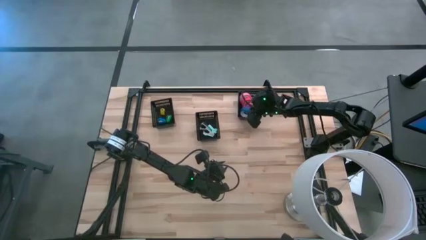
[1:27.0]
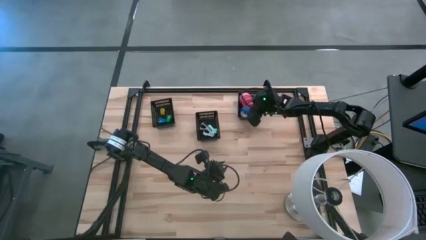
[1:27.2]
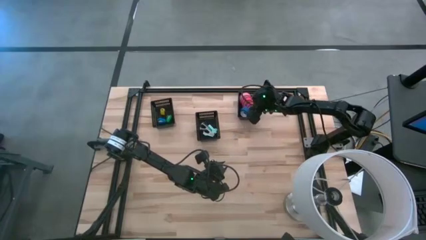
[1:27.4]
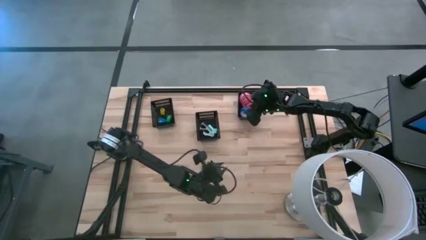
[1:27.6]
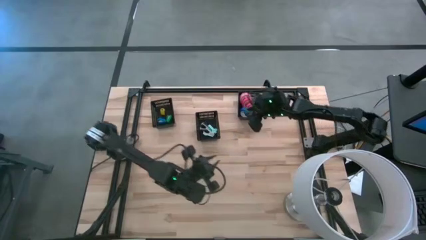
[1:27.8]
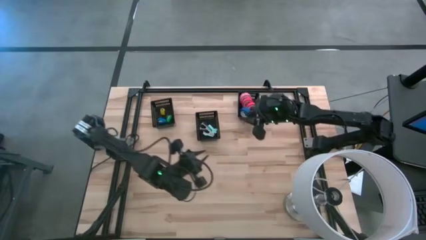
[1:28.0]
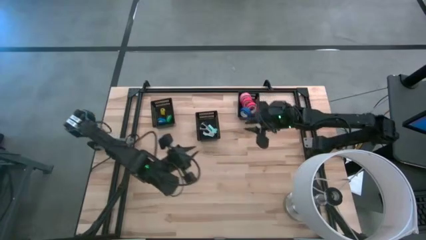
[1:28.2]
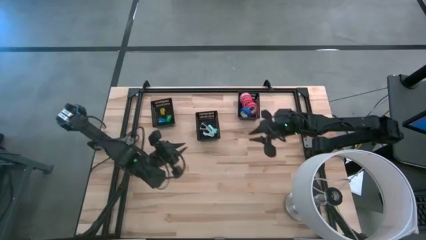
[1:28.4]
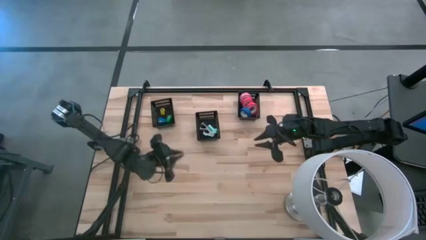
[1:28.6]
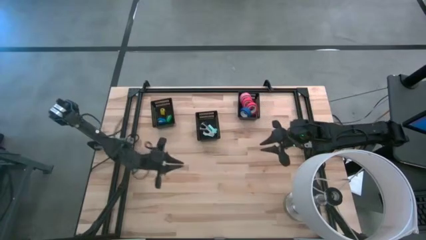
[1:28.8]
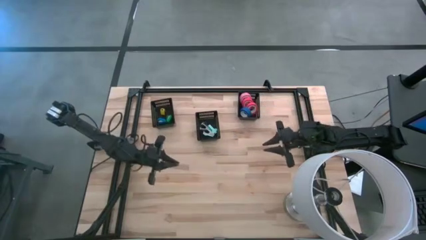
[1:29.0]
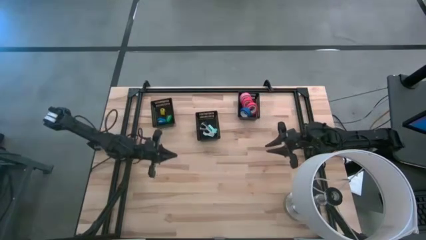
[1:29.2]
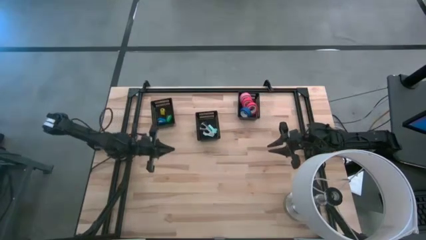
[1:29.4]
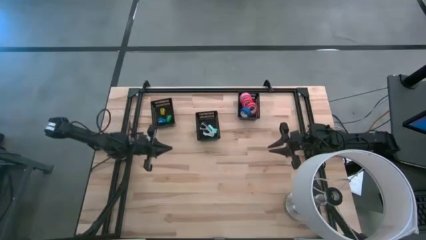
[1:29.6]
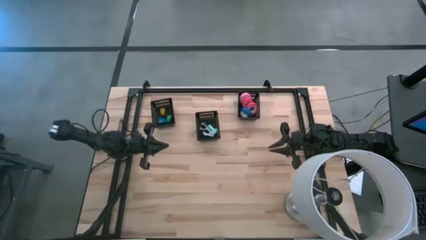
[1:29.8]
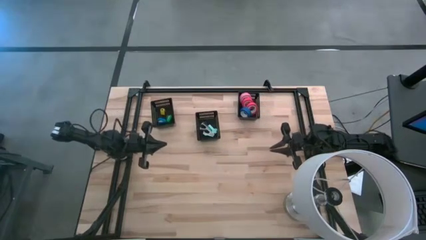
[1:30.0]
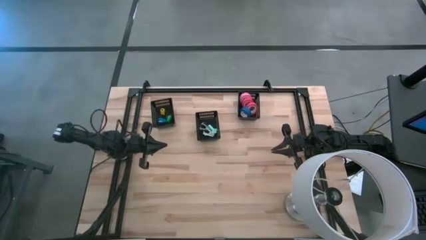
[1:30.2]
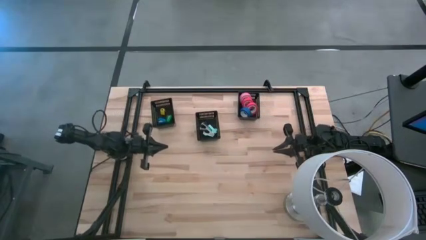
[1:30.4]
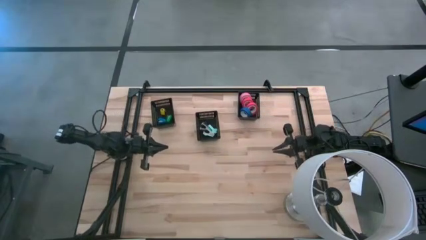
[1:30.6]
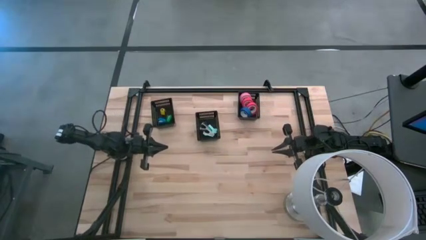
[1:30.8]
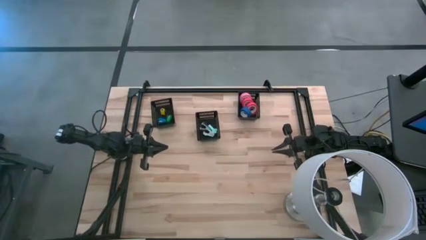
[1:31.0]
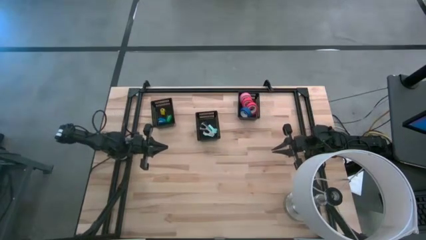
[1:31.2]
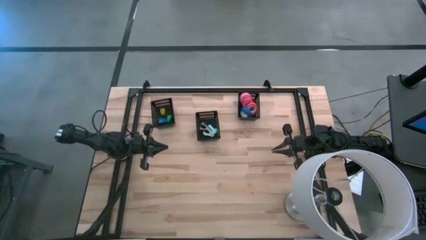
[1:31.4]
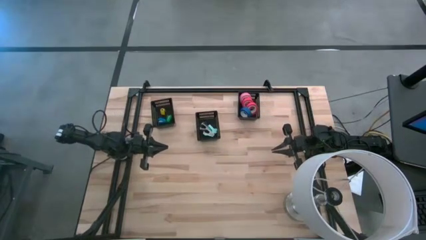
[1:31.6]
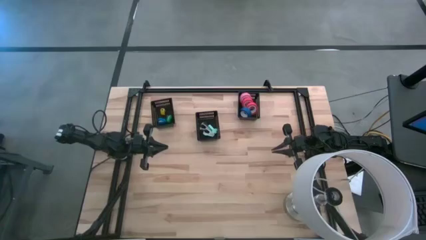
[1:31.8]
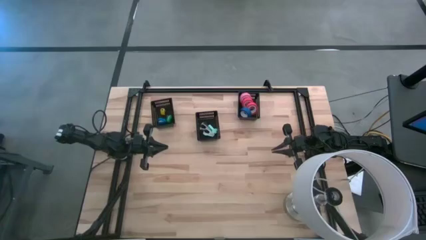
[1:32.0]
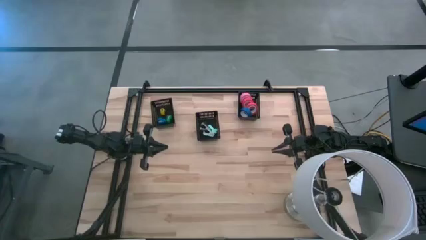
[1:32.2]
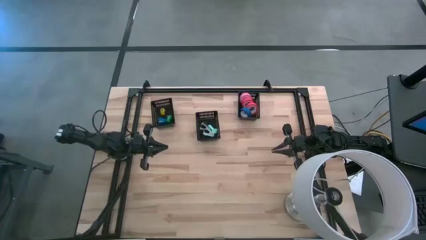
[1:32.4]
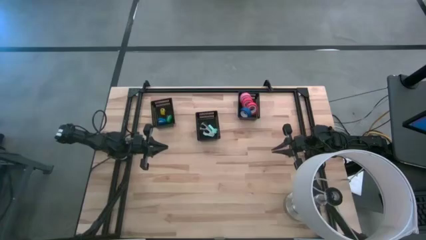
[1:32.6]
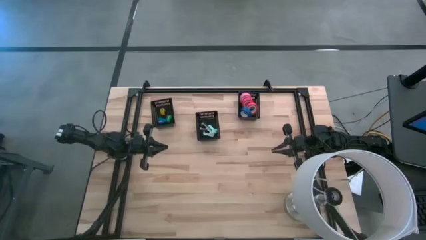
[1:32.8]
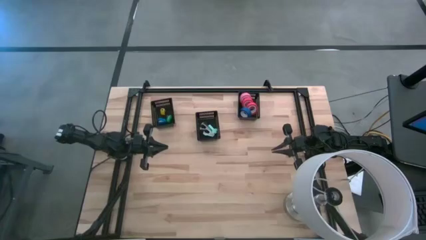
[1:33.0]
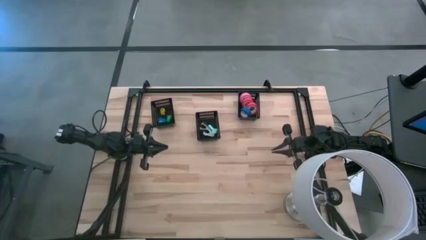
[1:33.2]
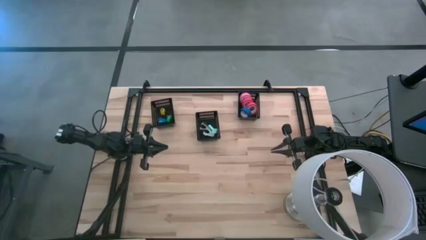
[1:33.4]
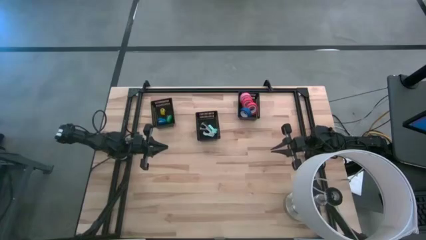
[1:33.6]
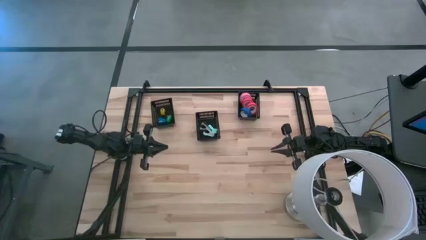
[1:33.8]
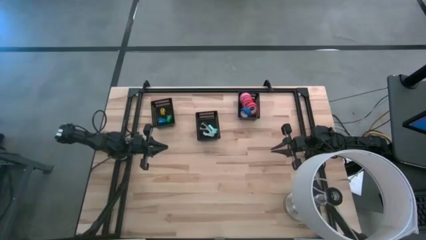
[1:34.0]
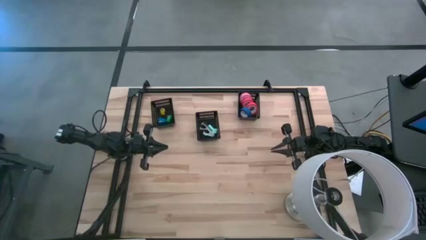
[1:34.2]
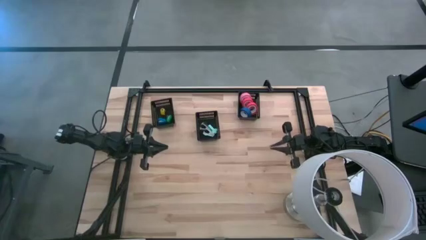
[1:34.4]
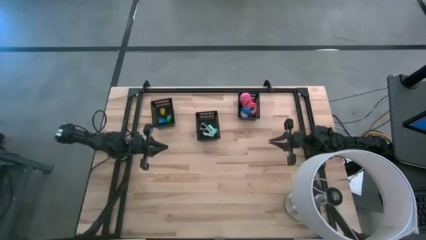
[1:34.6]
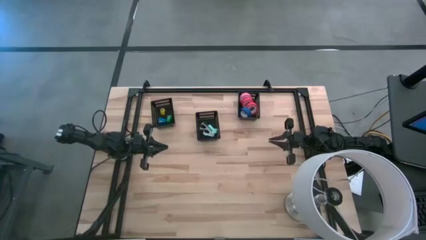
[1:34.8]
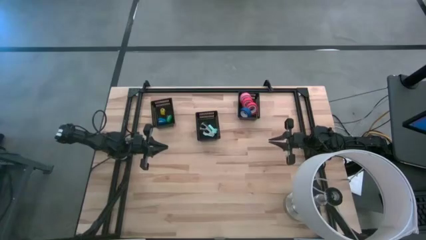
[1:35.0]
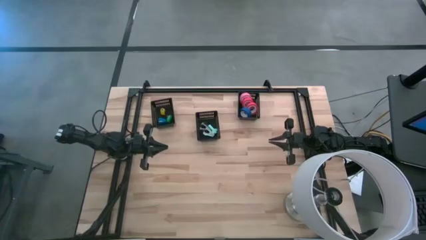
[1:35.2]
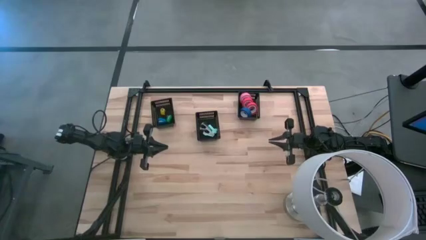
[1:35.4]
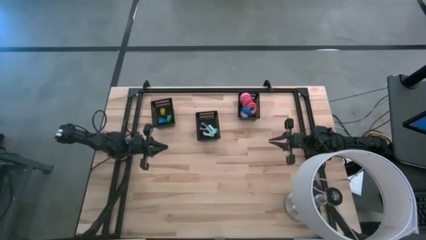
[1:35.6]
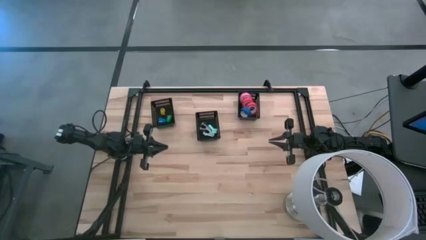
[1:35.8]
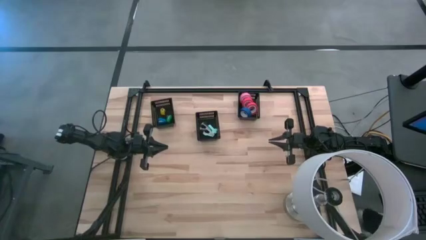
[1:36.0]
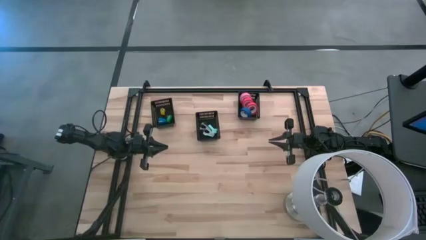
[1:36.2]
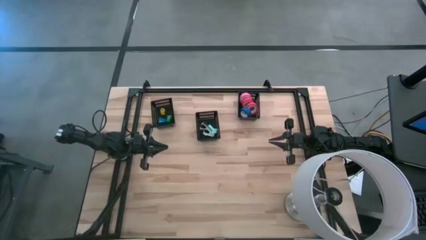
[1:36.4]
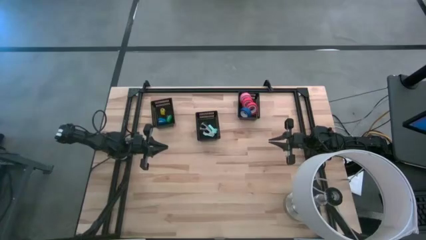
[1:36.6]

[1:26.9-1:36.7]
Task: Pick and place Stapler, Stapler remover, tape
Return to Home Position

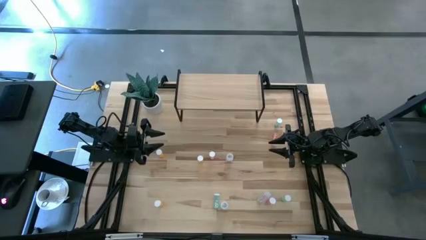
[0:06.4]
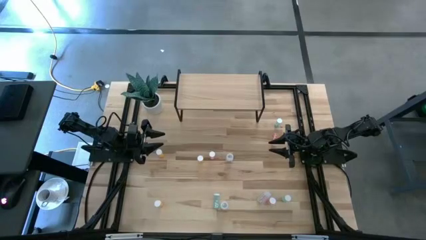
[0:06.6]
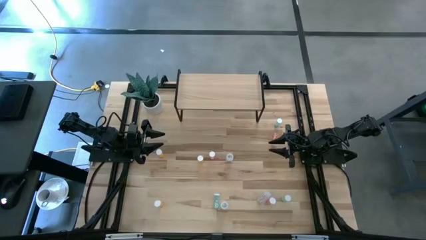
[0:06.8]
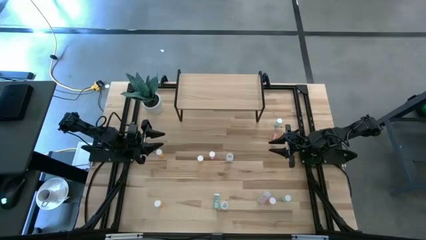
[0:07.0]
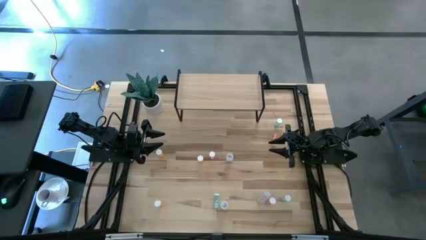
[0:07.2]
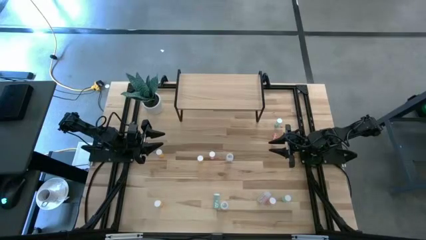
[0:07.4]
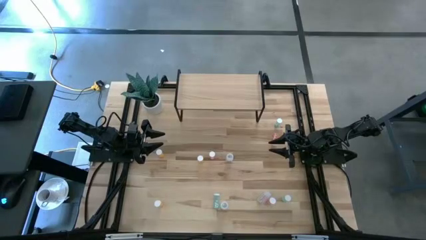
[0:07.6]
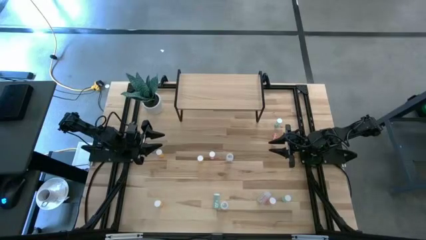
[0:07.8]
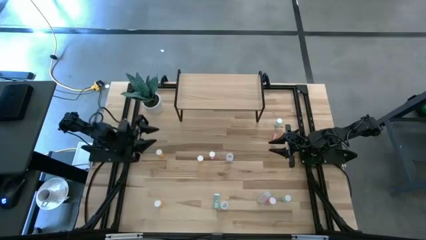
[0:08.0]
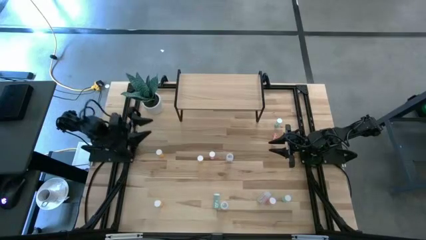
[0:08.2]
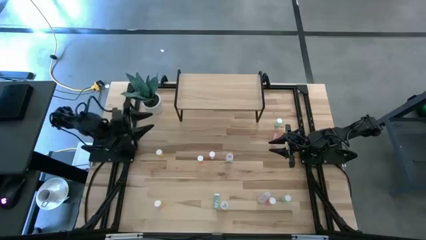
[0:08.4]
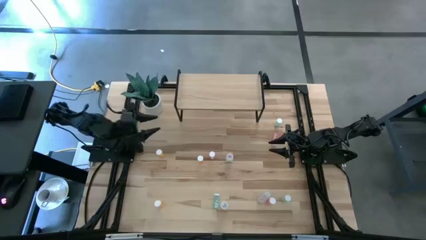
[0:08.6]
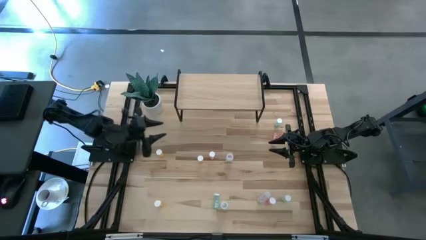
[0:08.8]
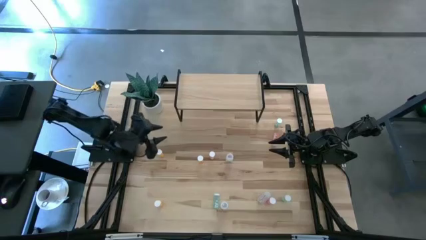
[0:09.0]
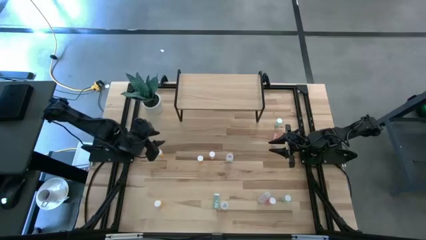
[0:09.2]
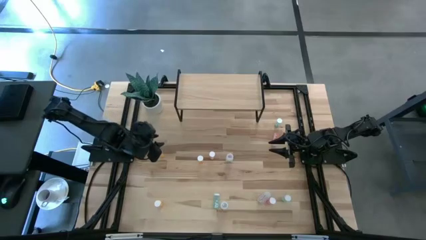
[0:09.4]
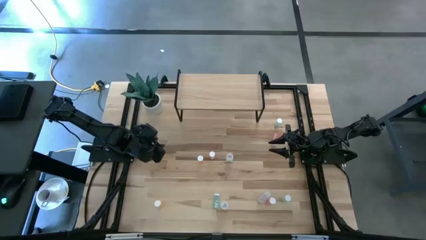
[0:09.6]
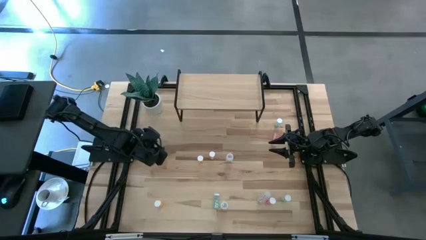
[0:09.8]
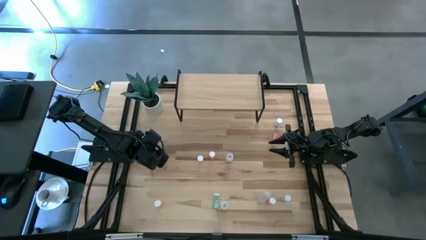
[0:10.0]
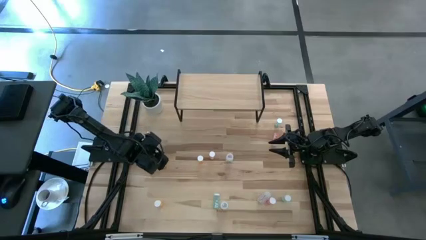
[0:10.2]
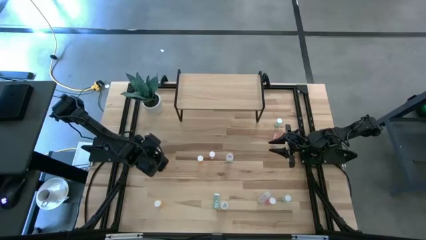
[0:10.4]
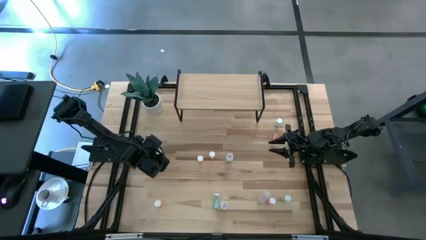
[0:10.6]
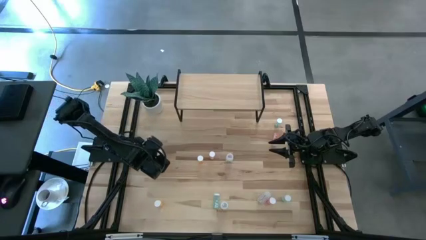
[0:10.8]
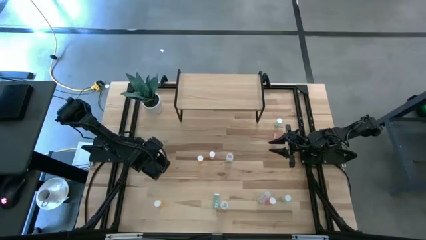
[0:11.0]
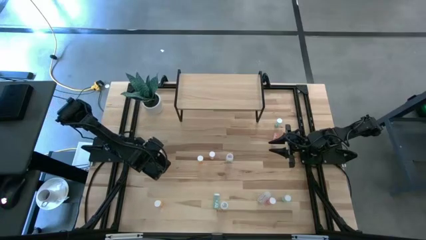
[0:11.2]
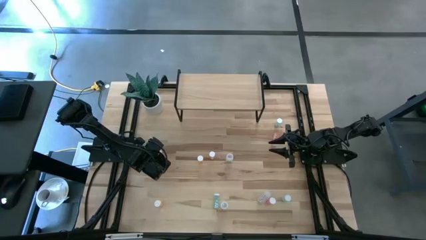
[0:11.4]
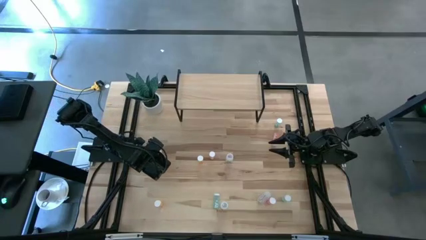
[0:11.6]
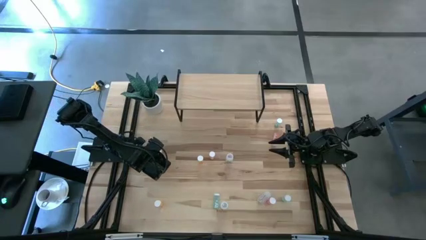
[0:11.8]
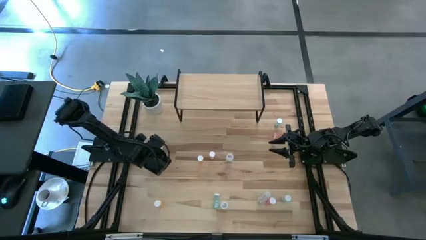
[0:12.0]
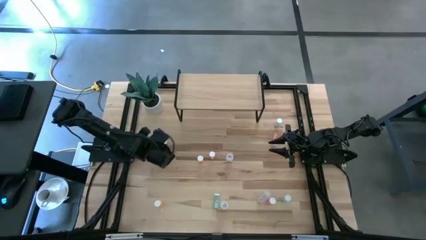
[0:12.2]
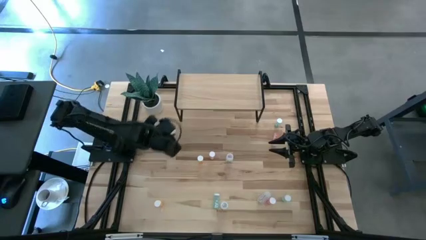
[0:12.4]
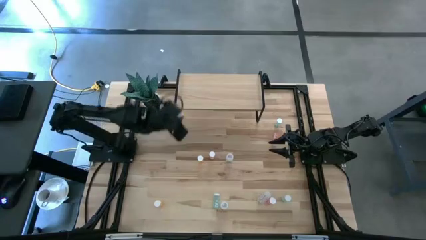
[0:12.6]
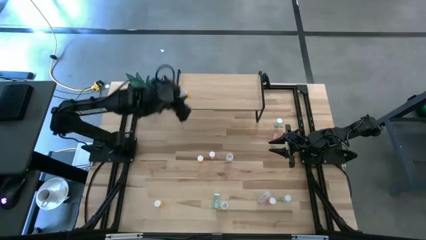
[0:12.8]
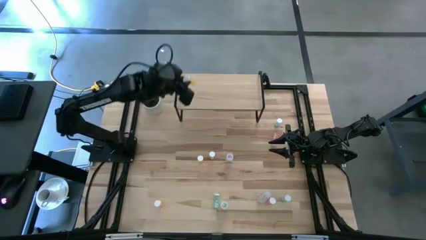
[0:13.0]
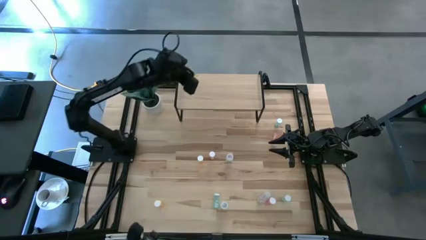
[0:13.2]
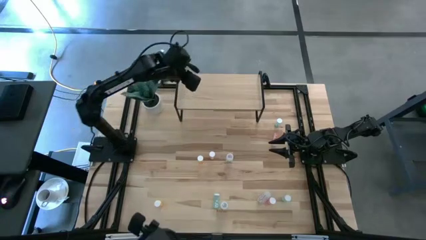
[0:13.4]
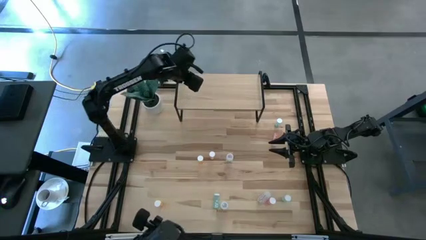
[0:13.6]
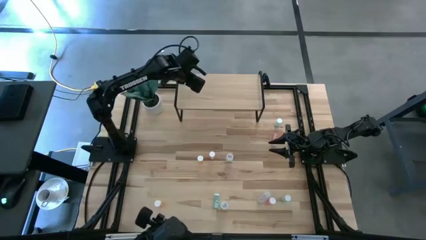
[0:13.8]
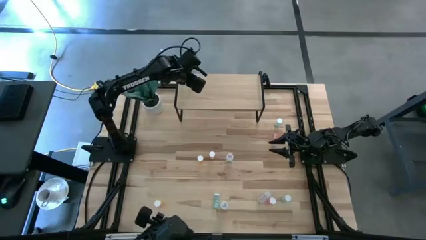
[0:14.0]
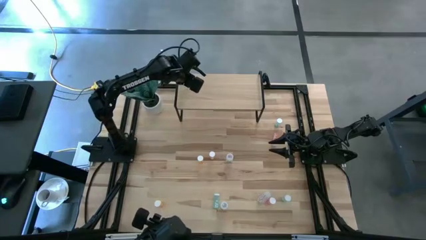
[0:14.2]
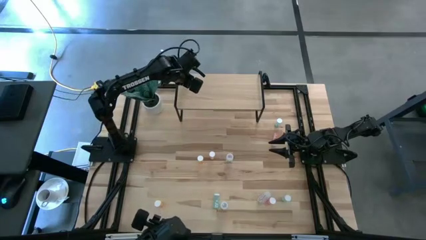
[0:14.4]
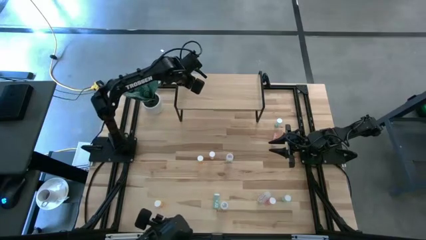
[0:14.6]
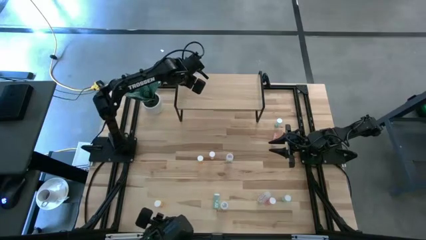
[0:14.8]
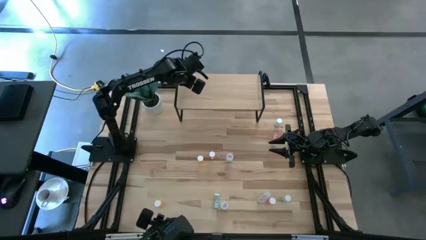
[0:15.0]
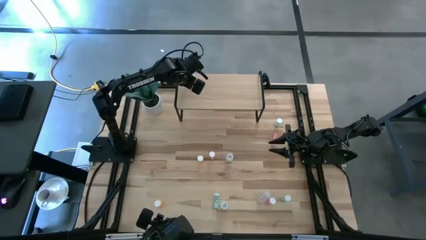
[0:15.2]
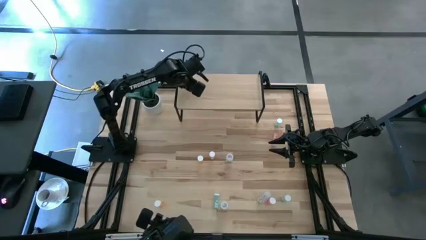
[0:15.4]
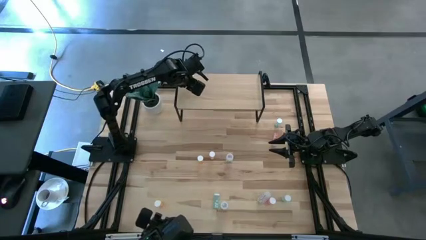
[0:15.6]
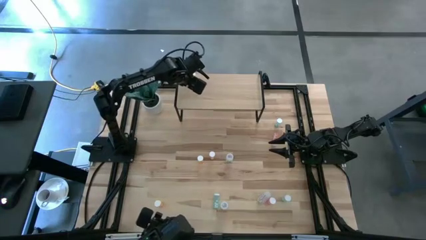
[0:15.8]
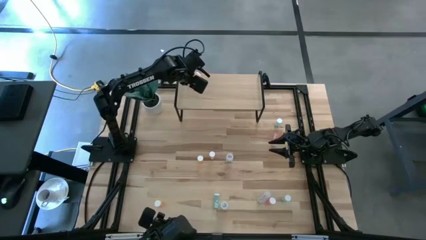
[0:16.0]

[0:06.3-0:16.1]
Task: Pick and place medicine bottles onto shelf by color
Put the top left orange pill bottle on the shelf
